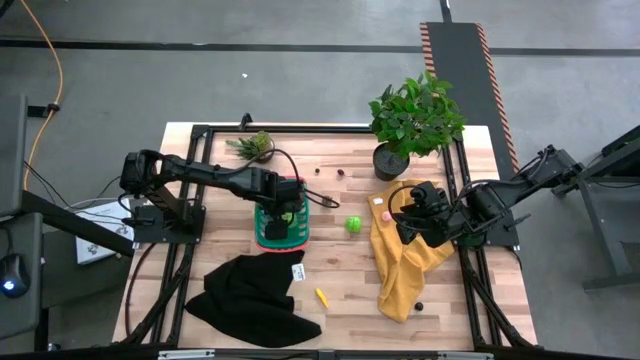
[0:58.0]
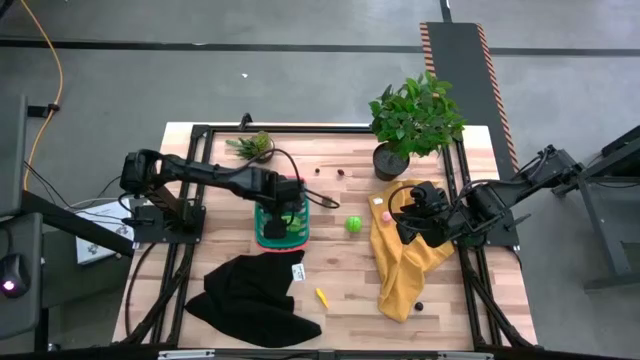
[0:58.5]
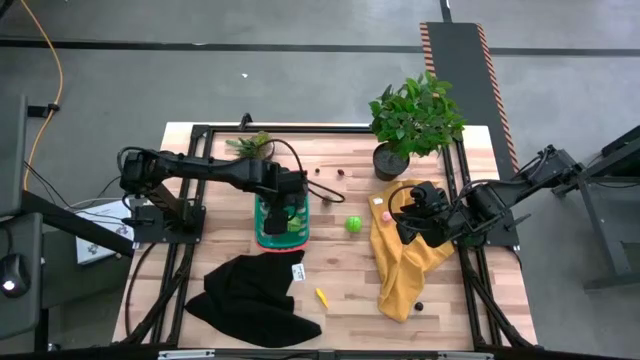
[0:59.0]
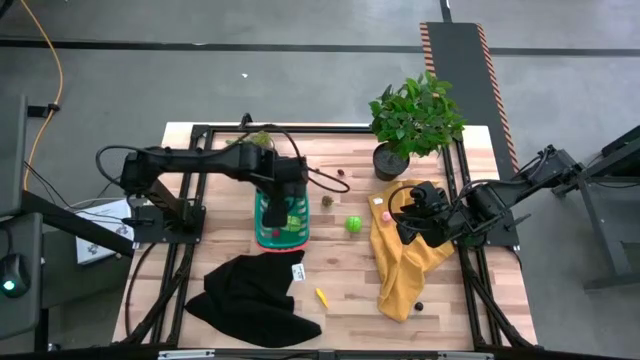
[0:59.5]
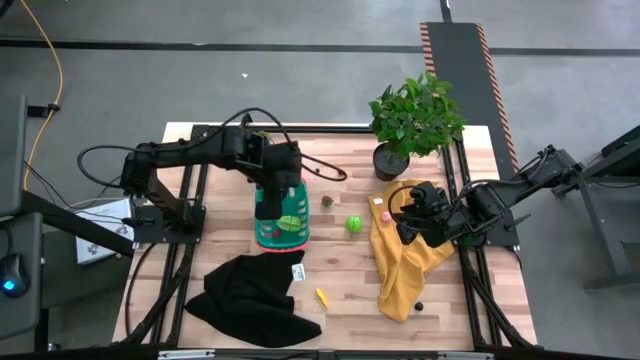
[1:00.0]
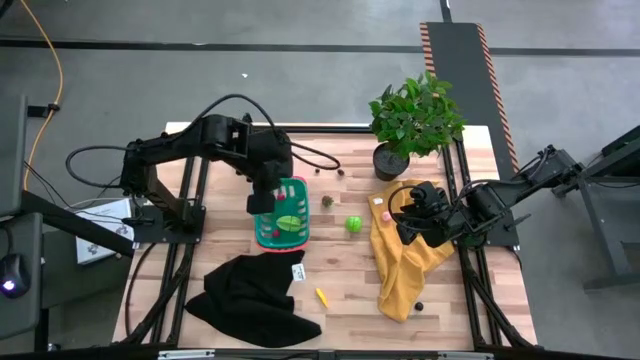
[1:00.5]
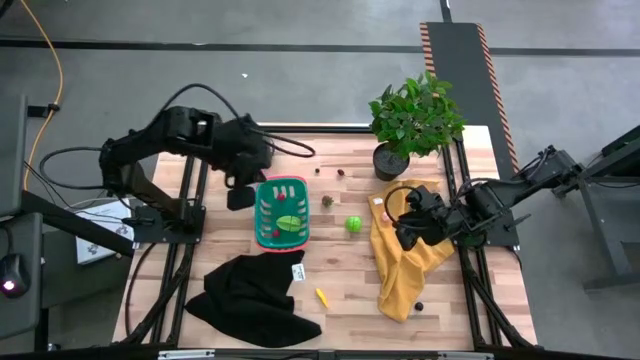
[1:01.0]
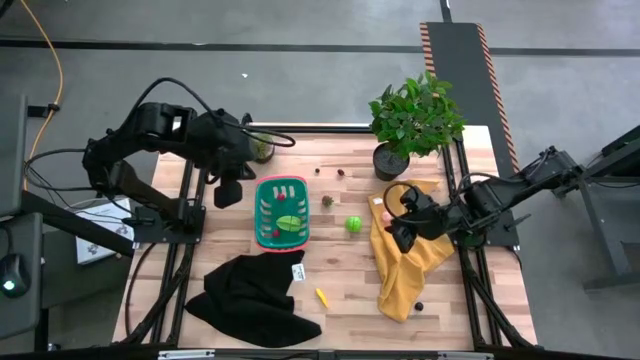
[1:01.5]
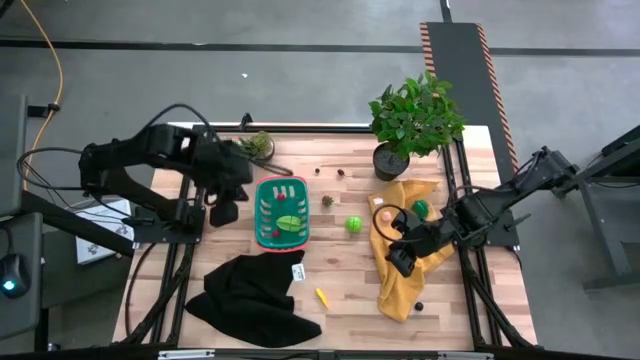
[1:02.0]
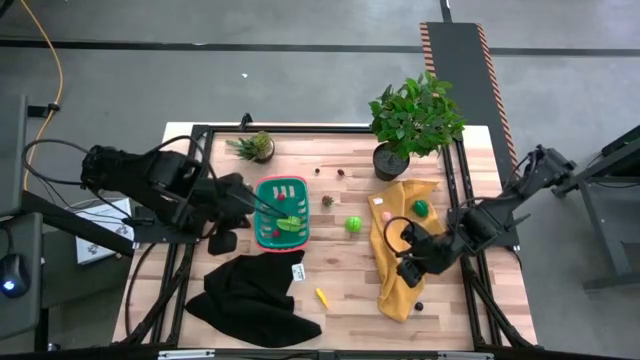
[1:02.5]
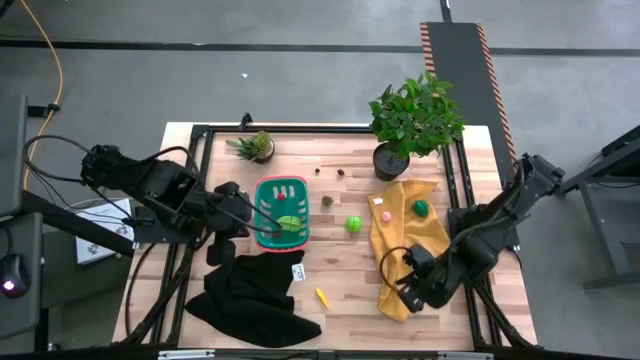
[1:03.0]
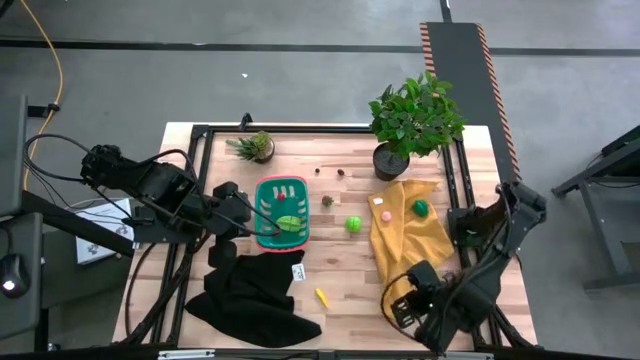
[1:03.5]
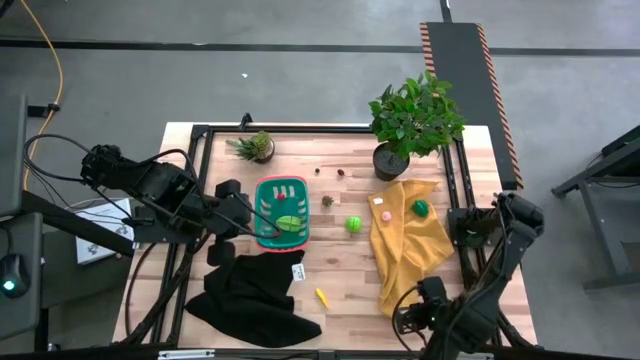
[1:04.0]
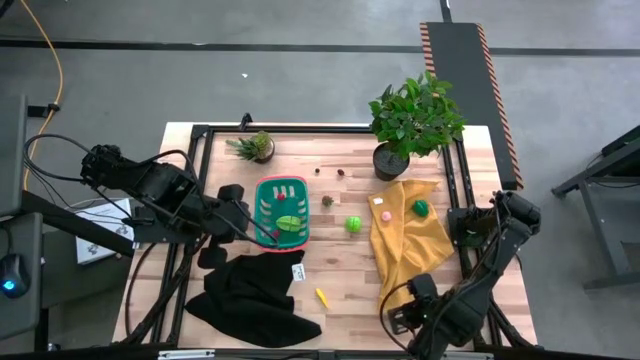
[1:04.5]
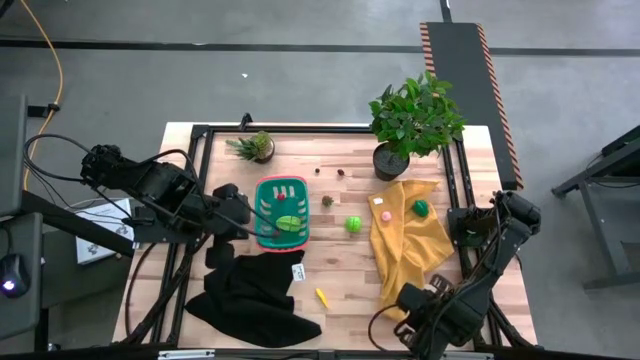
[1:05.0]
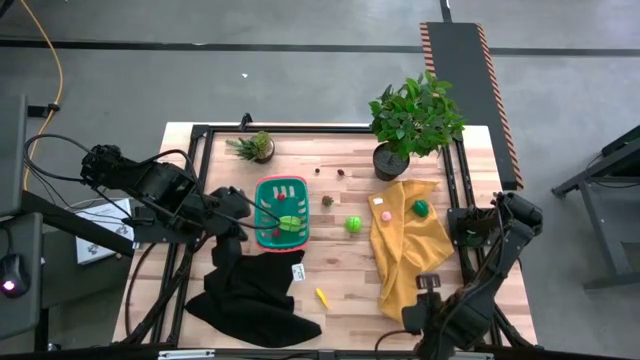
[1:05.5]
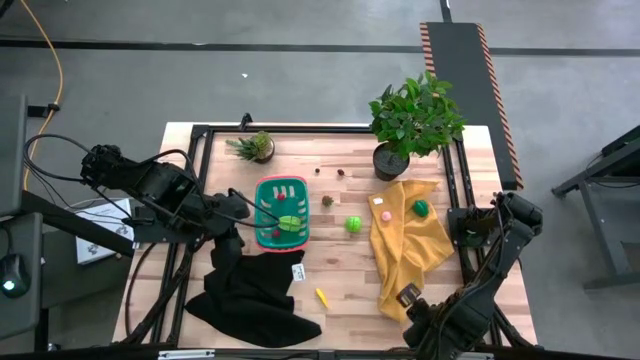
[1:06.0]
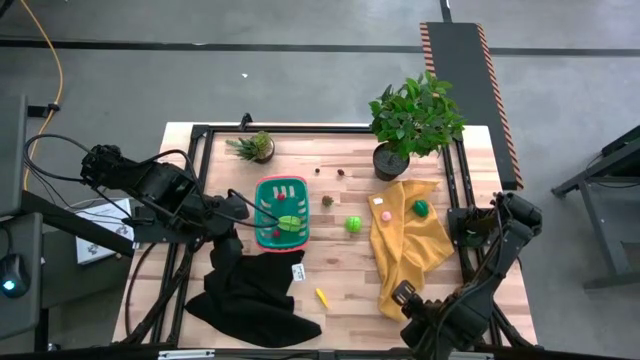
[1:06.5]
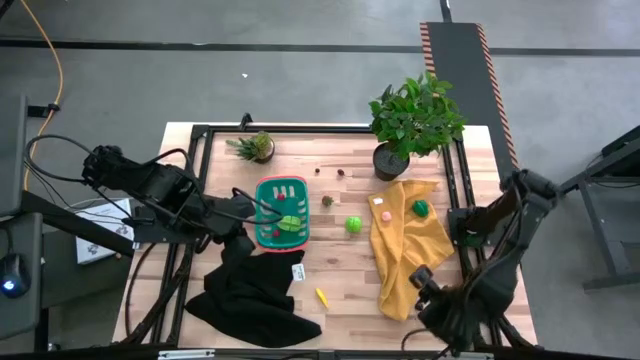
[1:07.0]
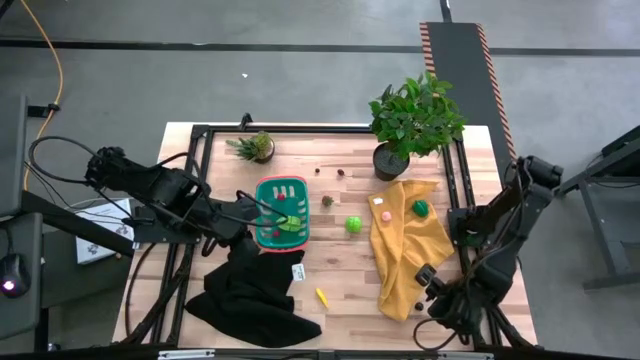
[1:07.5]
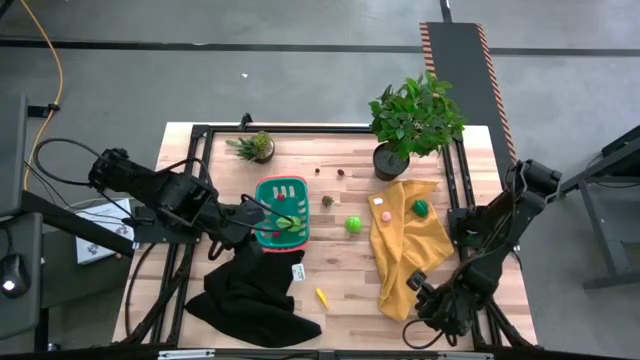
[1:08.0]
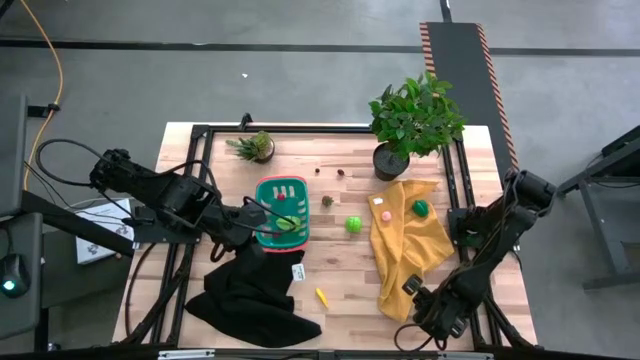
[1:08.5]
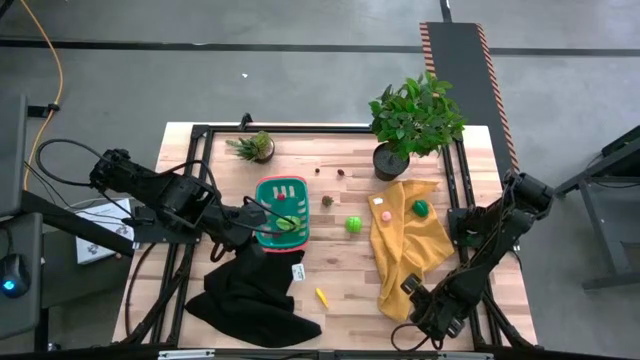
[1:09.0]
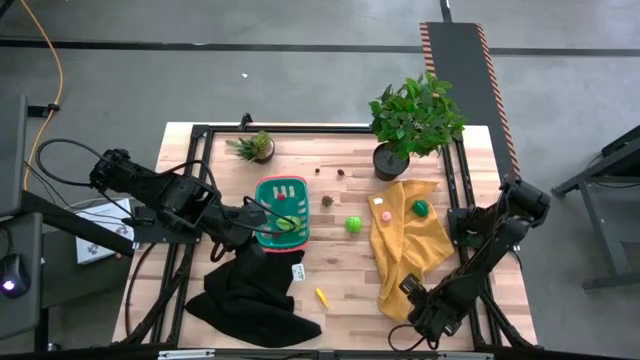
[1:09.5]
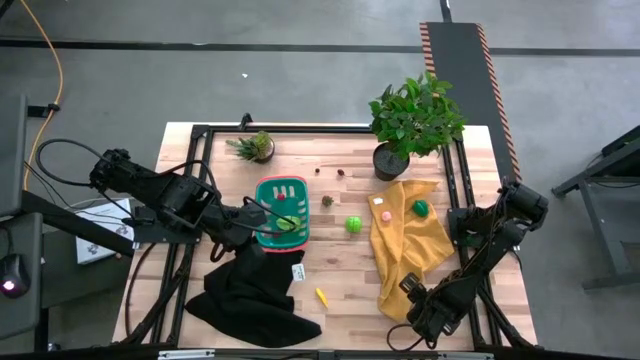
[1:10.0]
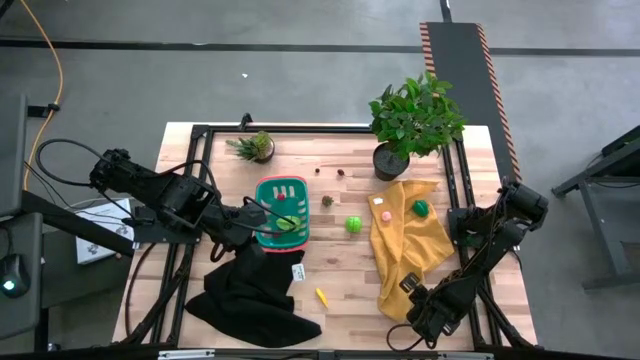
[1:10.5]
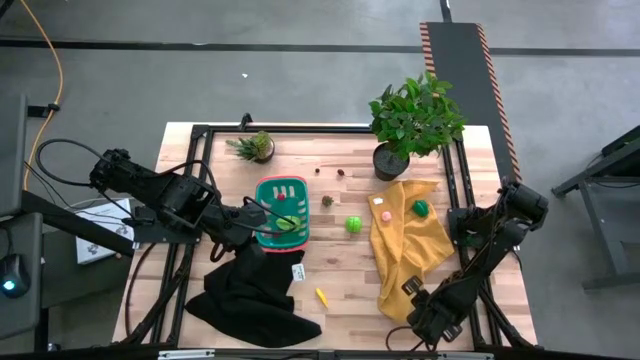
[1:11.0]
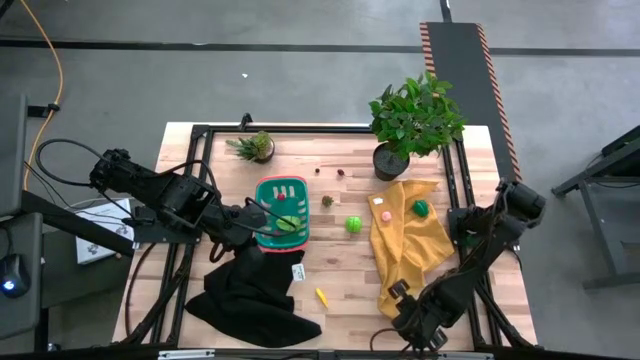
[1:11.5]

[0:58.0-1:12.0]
Task: Pick and placing Produce into tupperware
Put the black cherry in the green basket

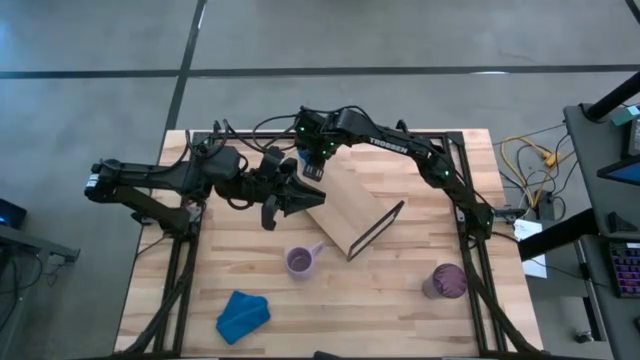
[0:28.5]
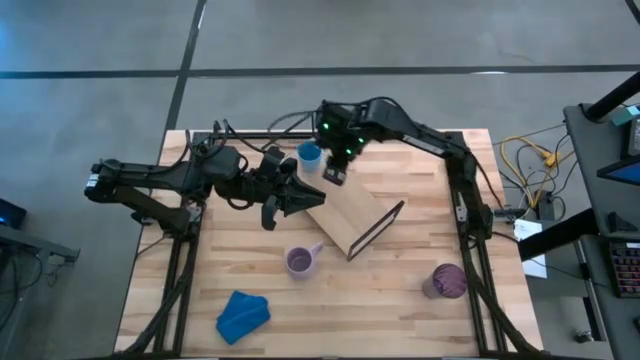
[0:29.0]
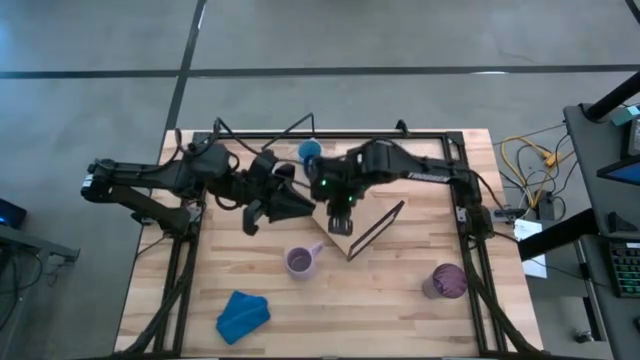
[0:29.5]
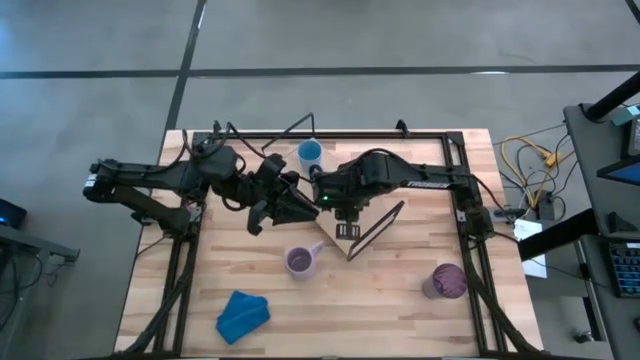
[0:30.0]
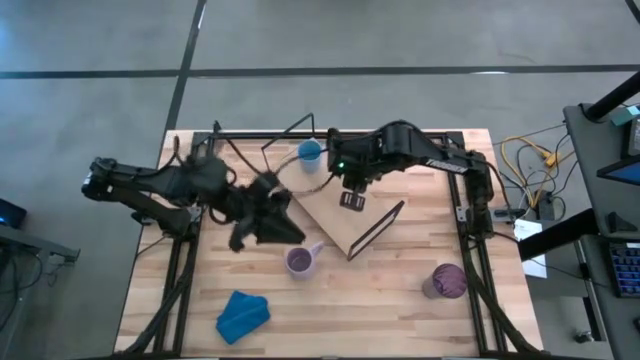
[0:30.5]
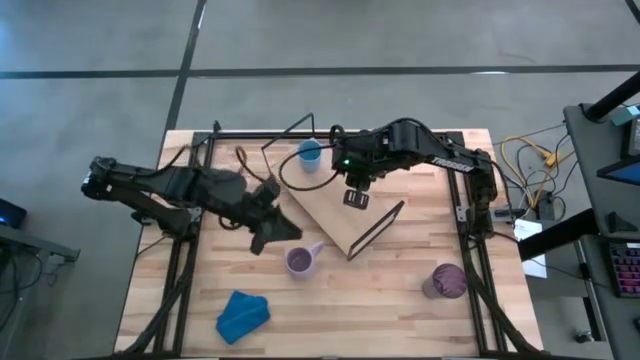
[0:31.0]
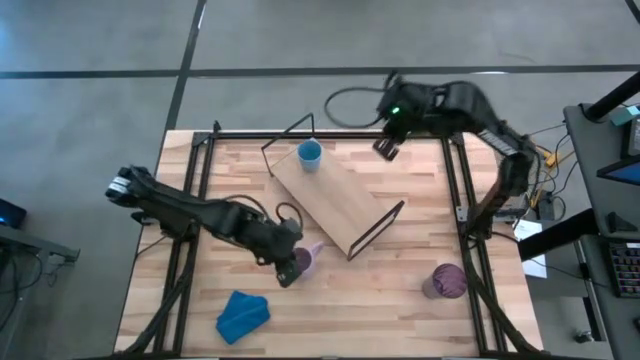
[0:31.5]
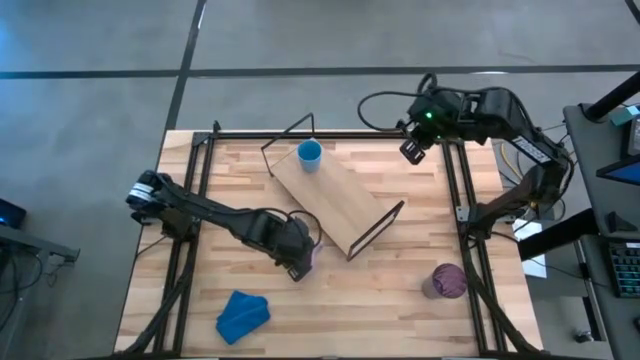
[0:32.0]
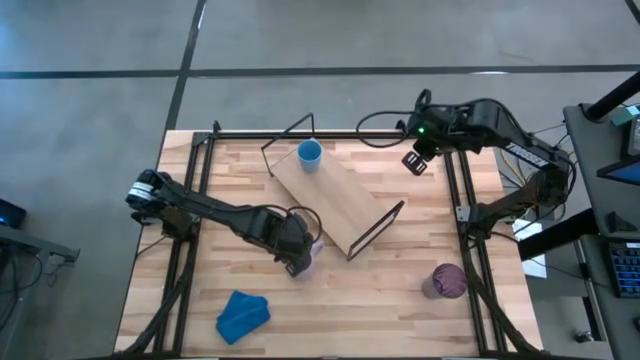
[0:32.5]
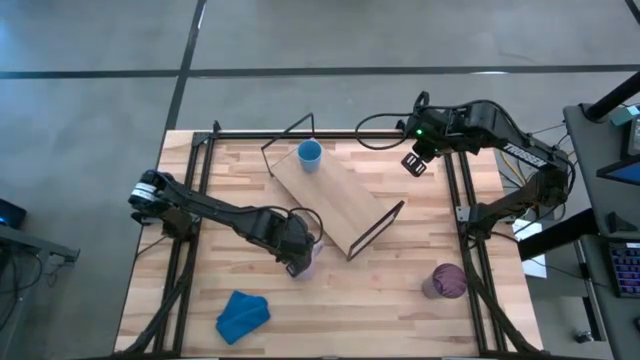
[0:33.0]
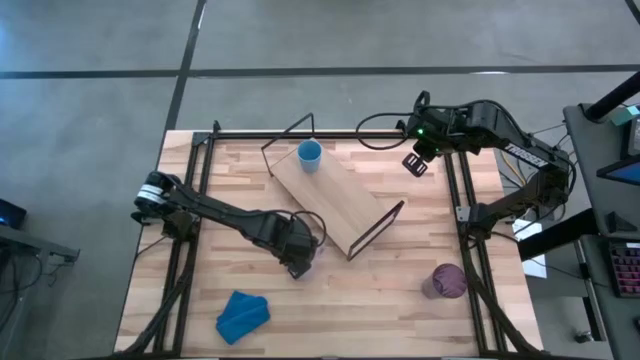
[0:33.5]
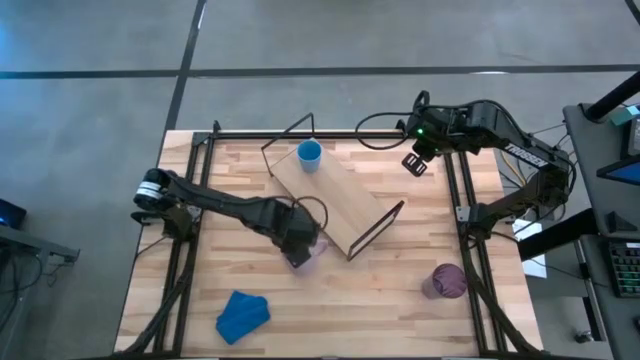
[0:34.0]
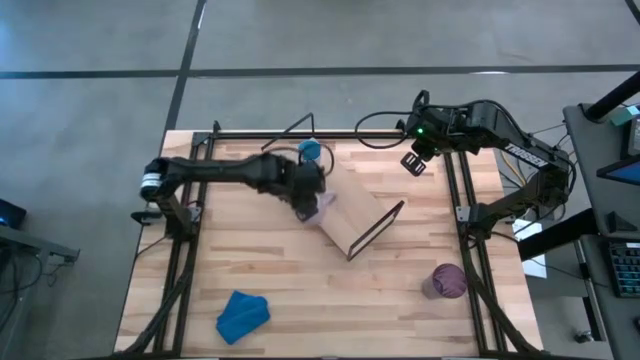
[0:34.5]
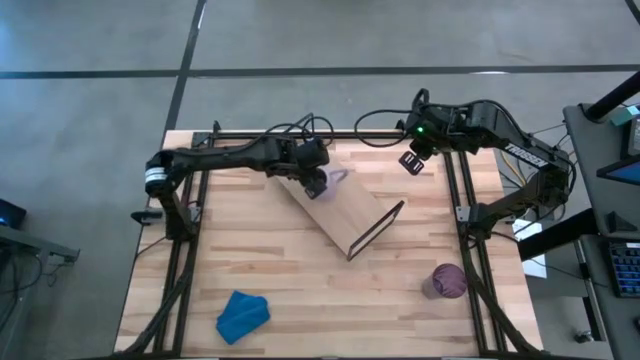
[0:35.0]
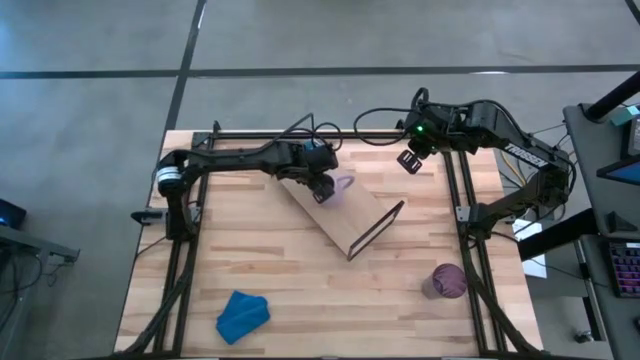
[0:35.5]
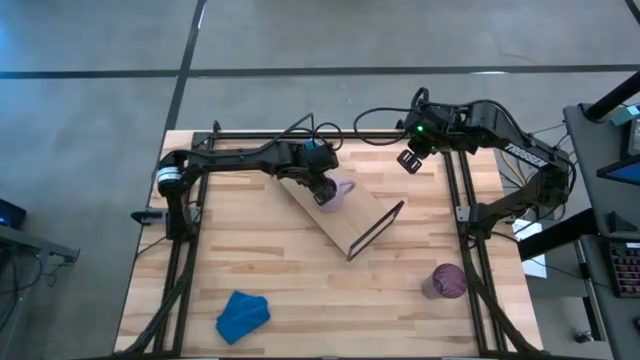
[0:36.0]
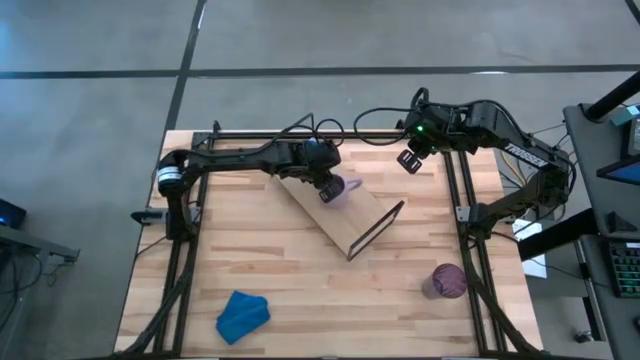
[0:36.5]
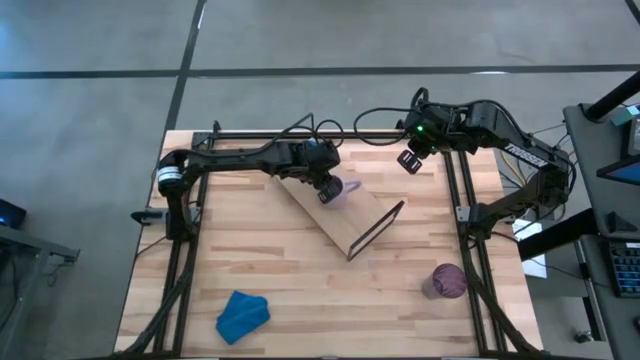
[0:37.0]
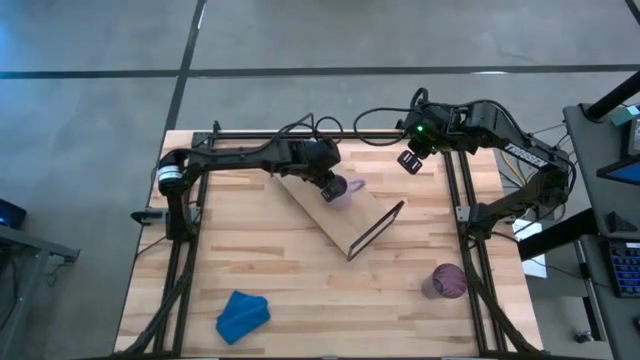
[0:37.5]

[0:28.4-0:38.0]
Task: Stack small to large cups/mugs on shelf
Put the purple mug on the shelf
